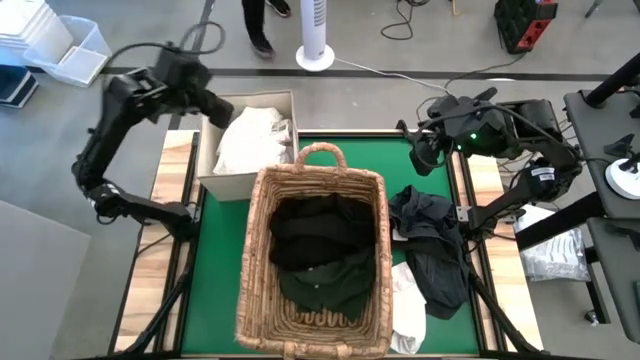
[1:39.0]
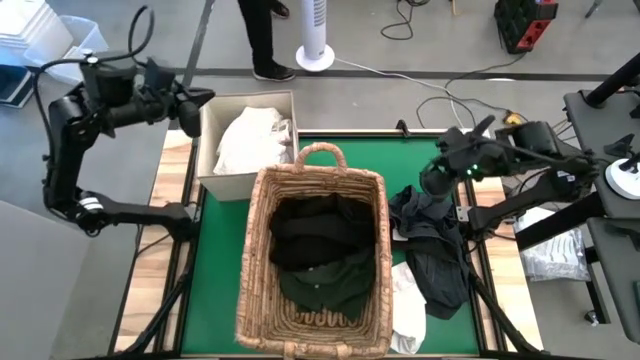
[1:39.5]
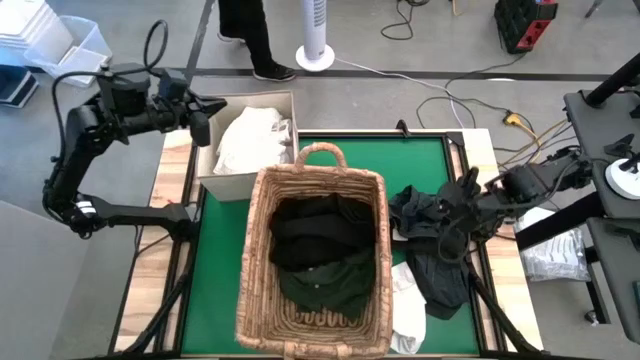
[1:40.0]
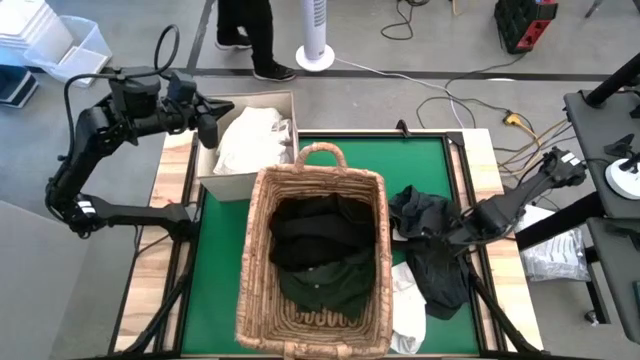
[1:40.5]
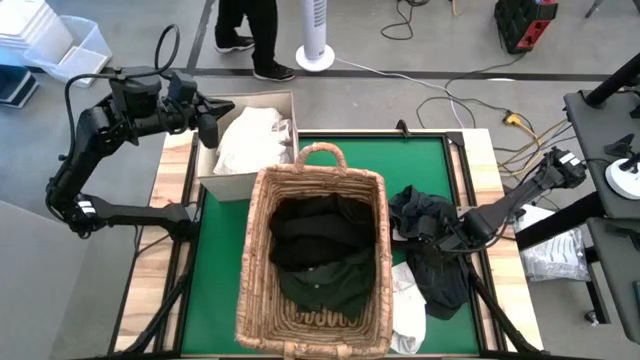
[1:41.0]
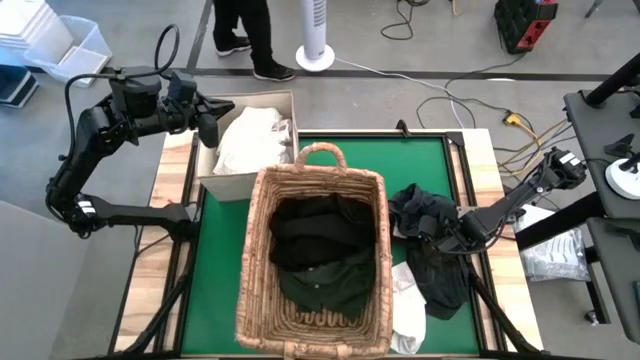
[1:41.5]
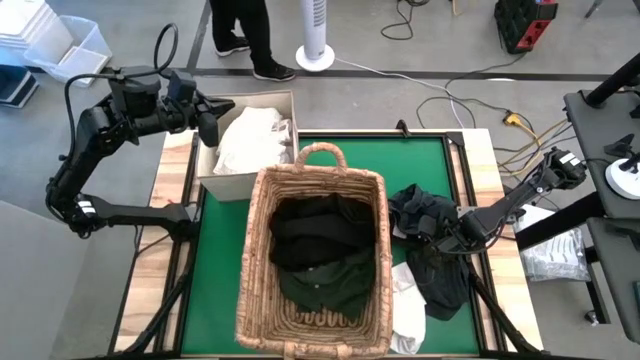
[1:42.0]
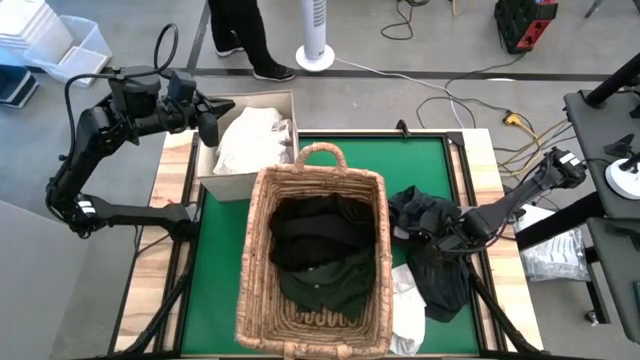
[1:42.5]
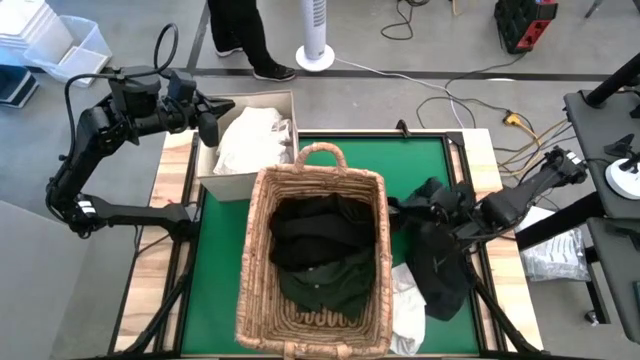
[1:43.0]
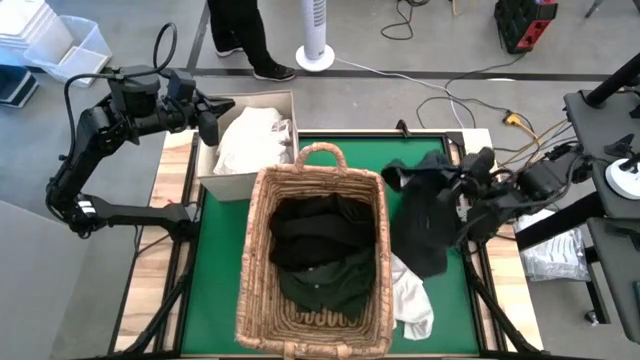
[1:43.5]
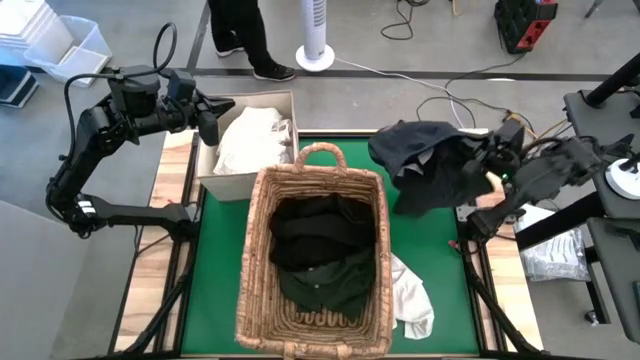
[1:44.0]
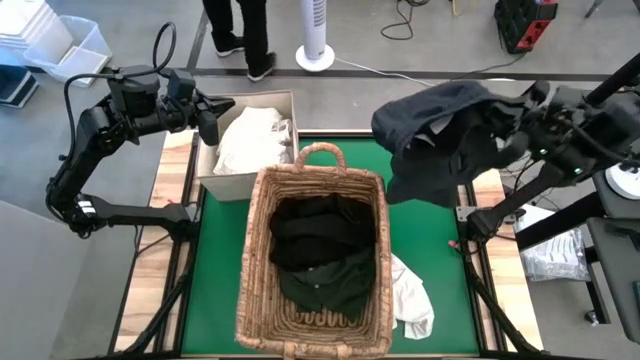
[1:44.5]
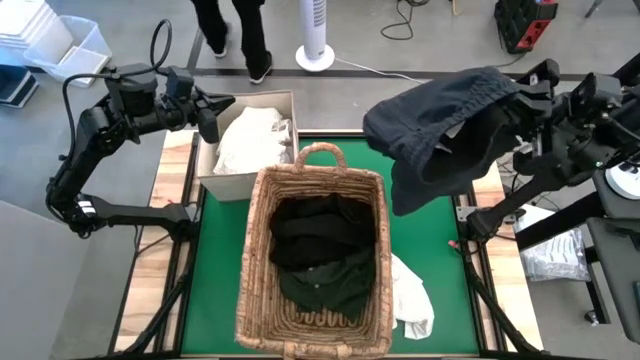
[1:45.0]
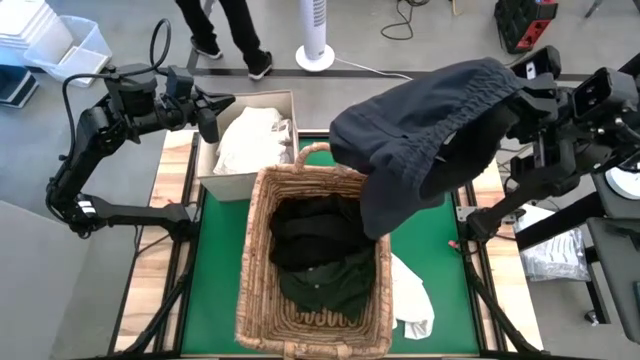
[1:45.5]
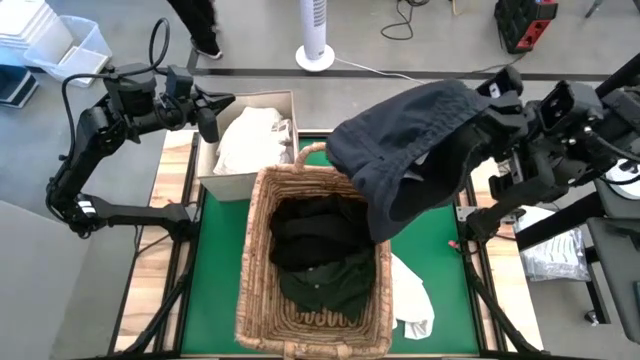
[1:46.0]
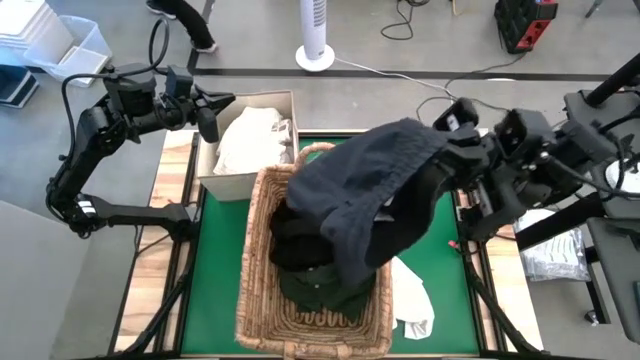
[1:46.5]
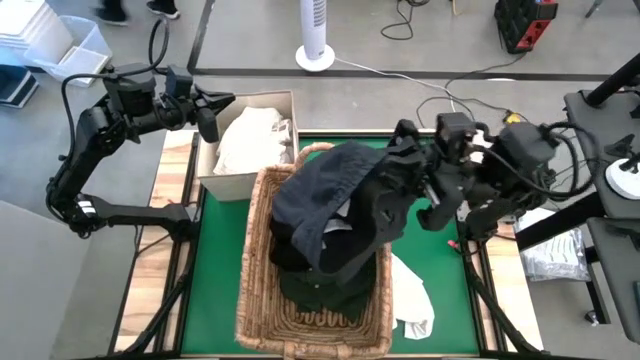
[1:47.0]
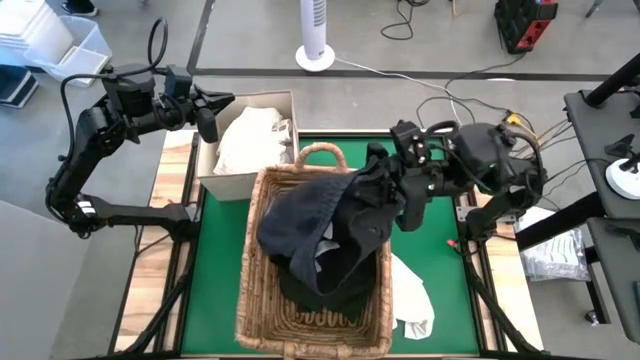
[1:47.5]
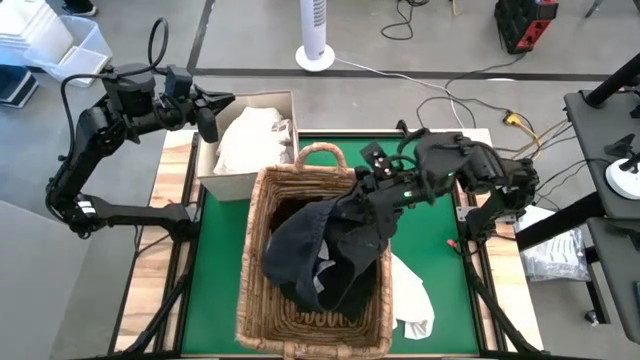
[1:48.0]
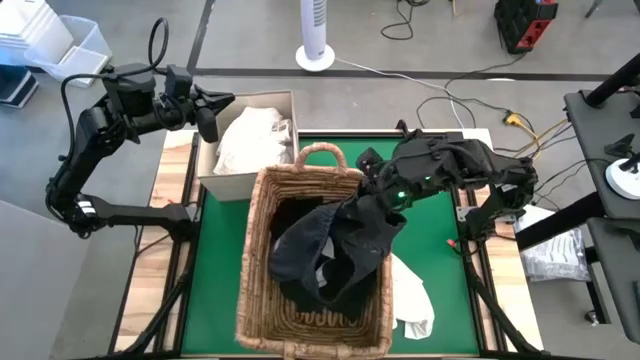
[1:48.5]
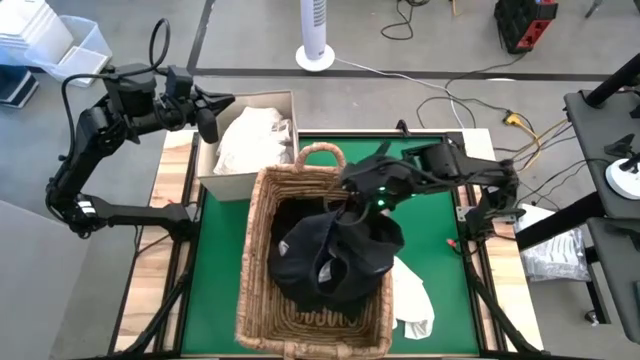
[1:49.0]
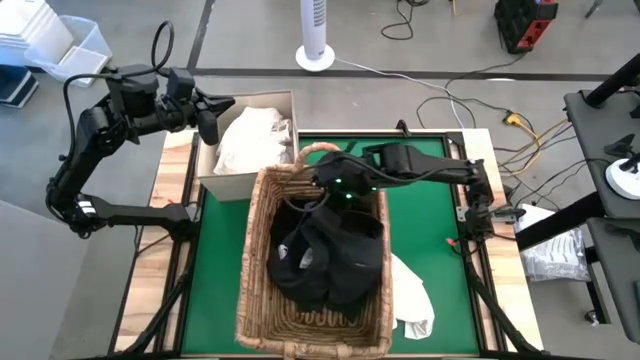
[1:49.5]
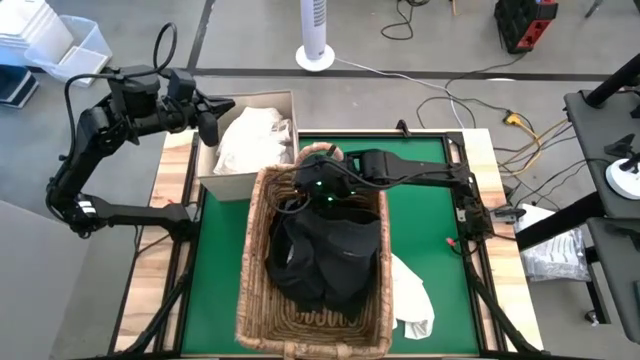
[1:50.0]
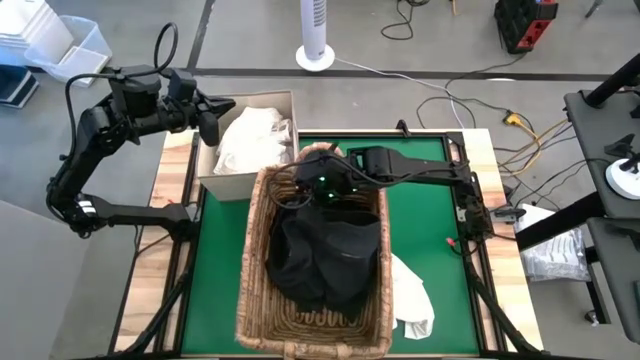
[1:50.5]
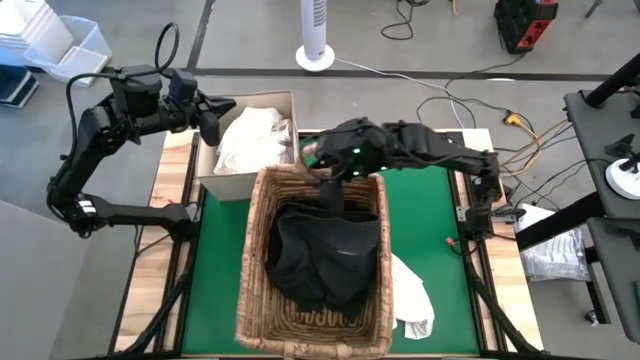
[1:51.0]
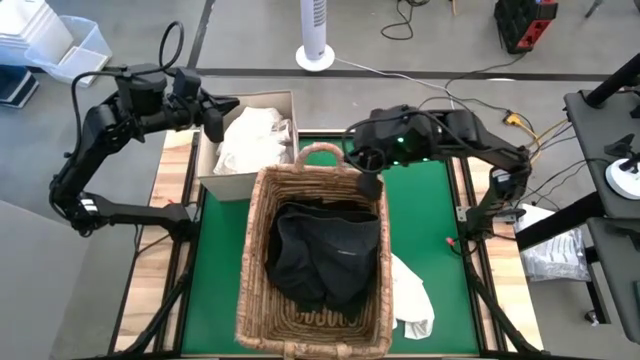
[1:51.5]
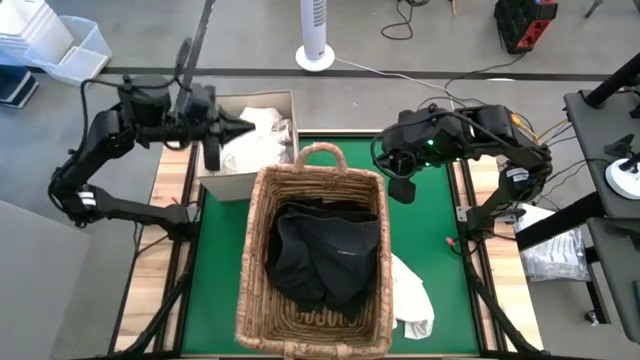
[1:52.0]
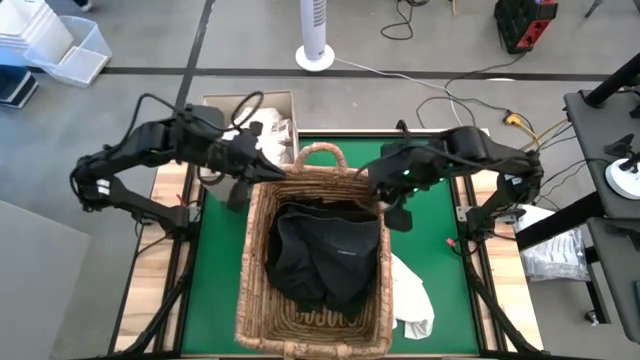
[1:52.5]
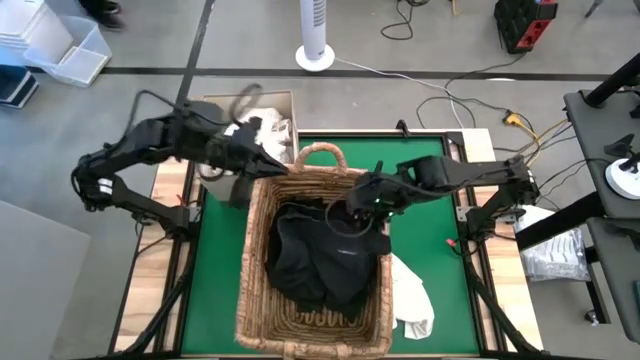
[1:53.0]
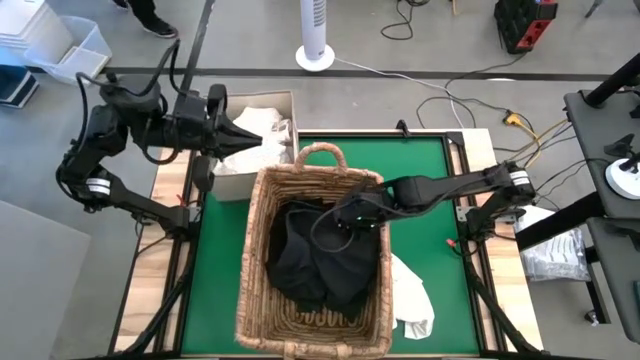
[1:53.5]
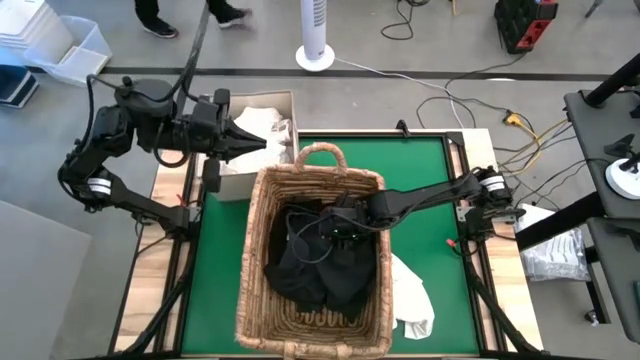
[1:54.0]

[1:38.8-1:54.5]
Put the black shorts into the brown basket

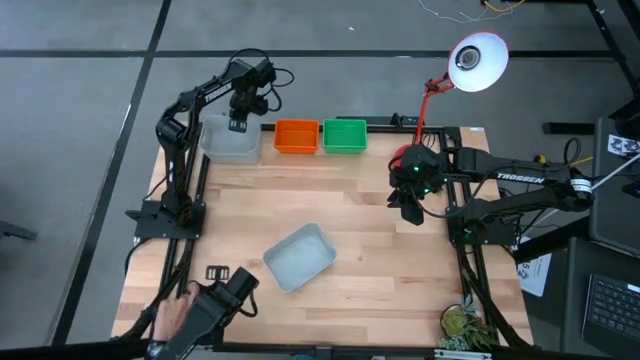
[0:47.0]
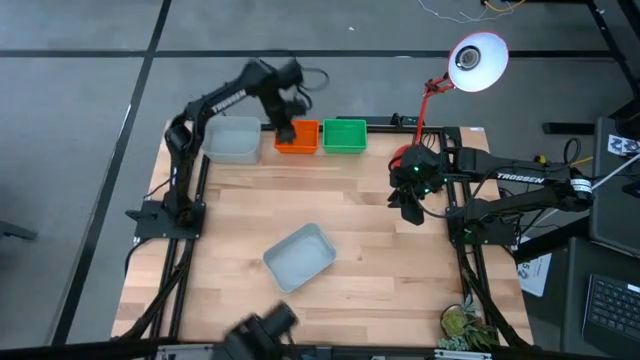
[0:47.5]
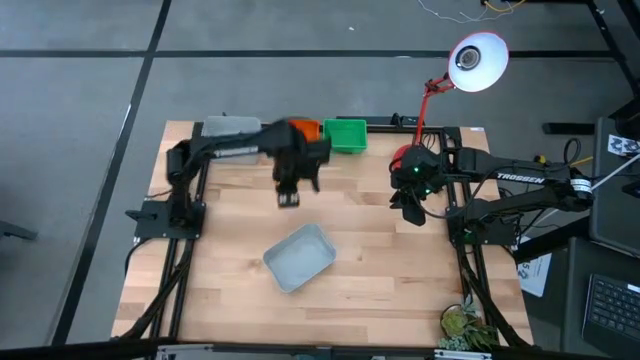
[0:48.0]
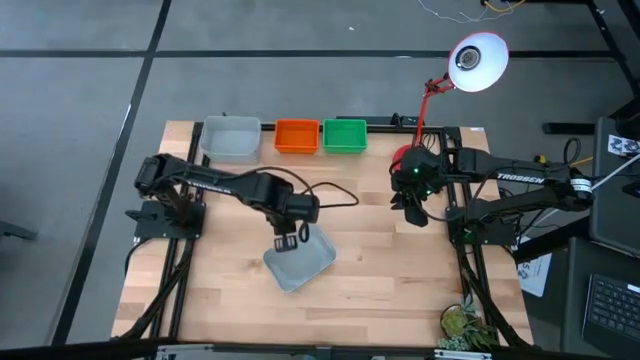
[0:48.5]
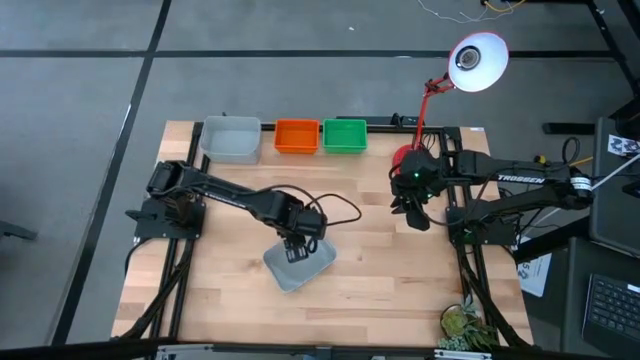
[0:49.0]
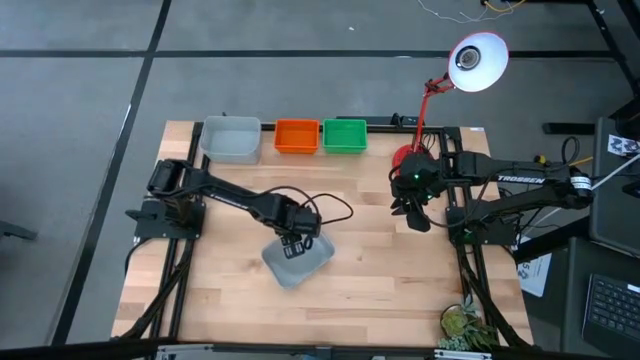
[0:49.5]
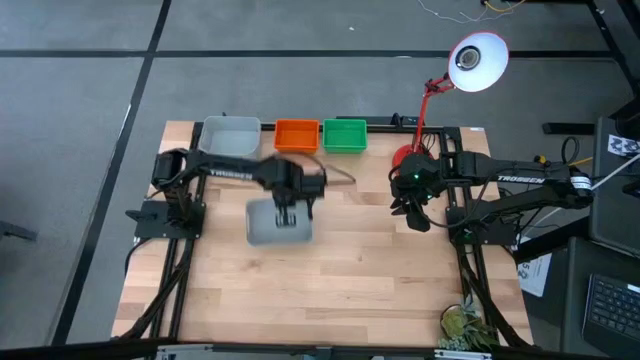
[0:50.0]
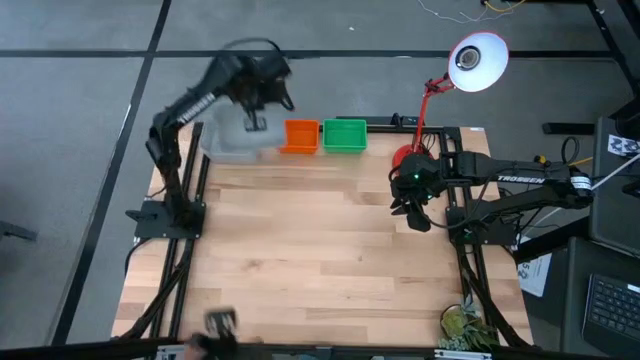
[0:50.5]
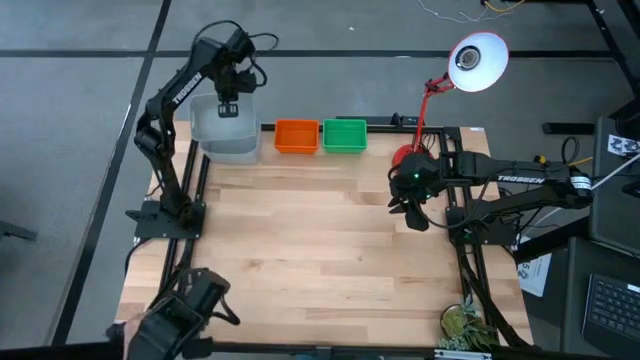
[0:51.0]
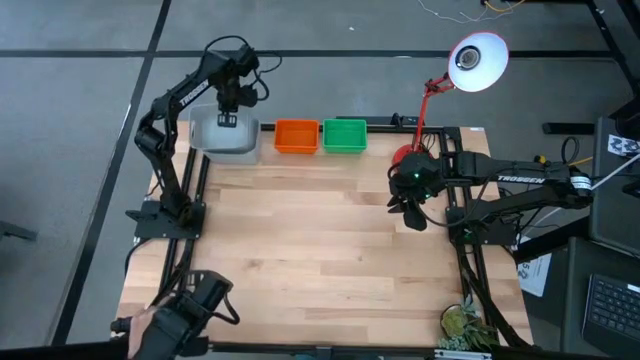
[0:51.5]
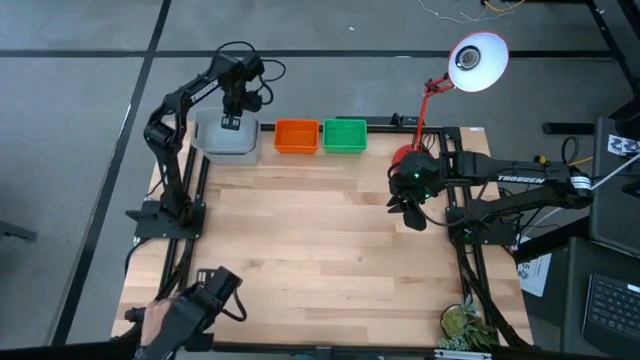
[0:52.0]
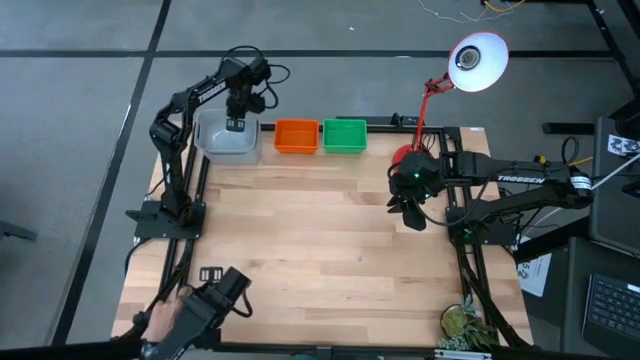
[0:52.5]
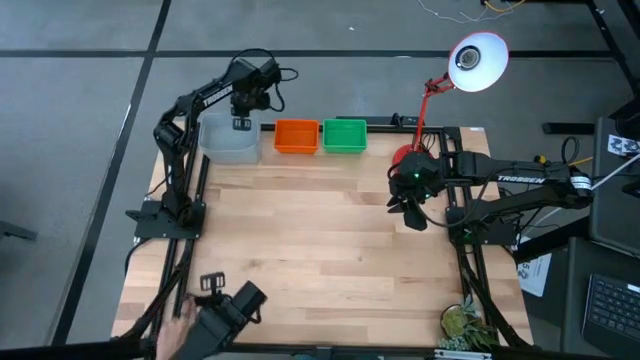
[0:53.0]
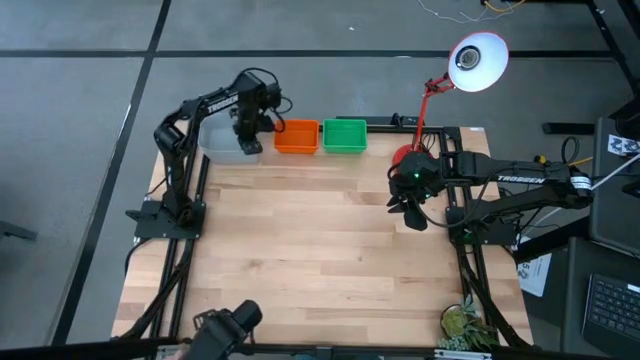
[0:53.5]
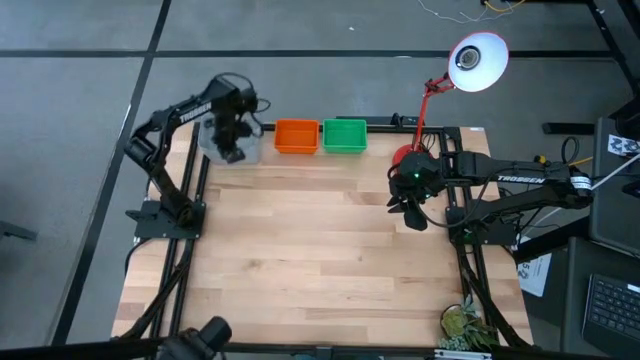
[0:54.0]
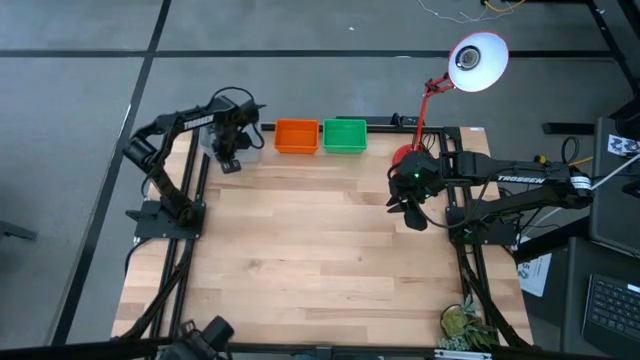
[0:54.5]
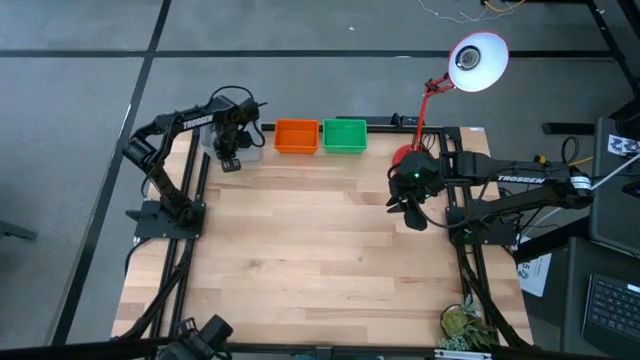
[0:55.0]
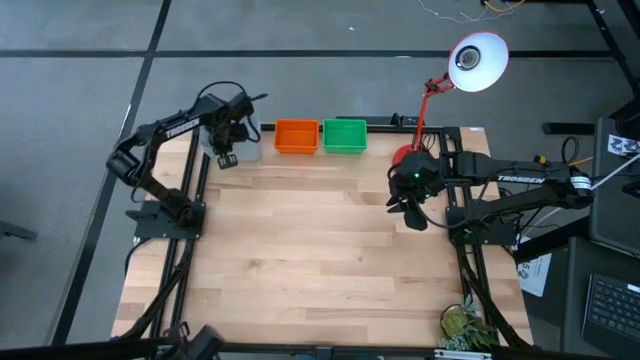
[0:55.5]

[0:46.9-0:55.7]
Stack the gray bin on the top gray bin
